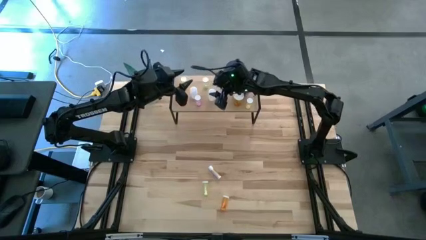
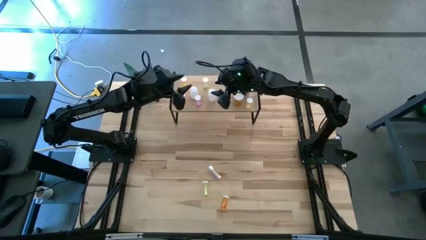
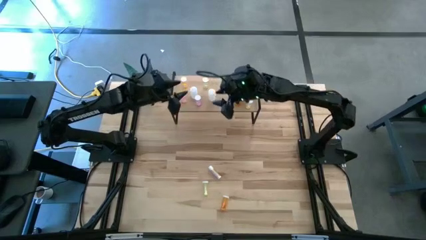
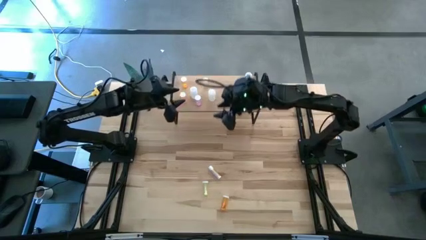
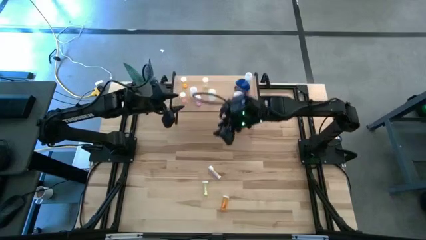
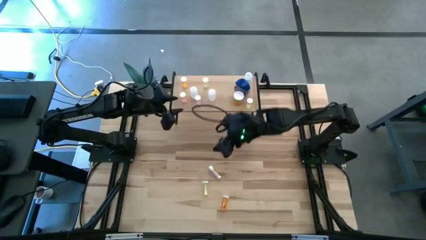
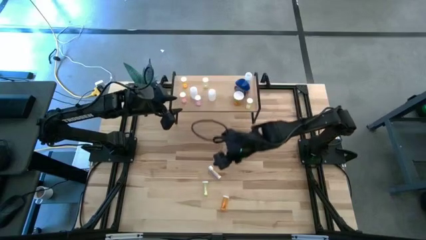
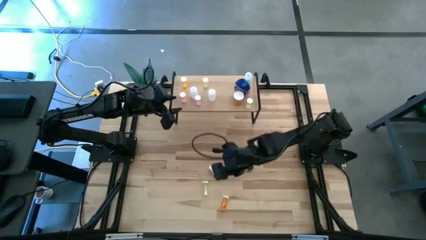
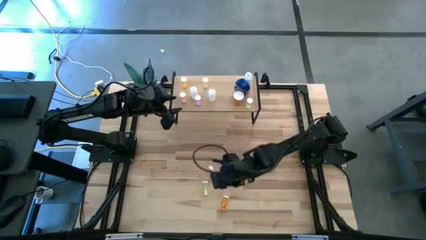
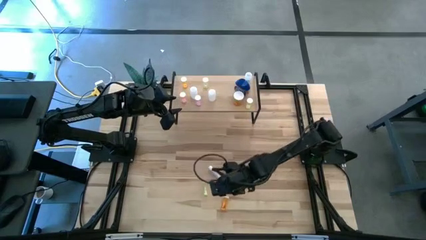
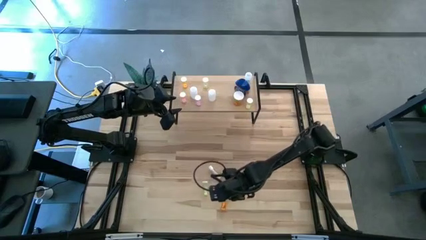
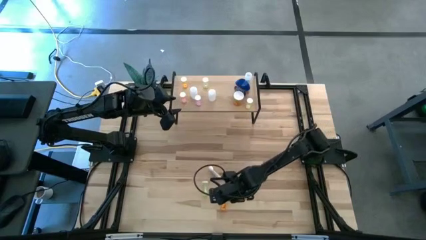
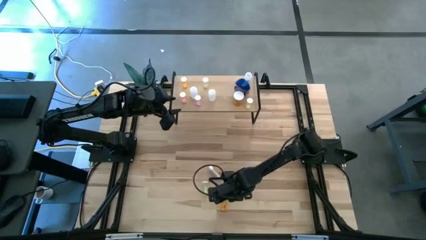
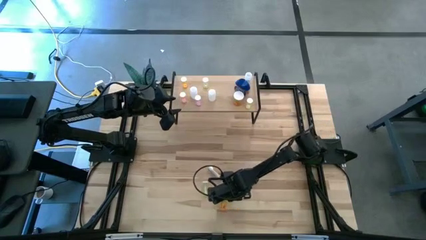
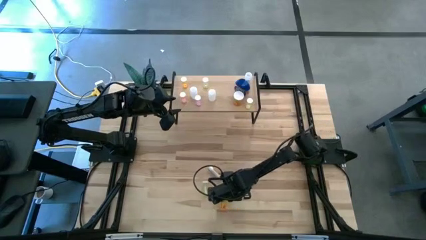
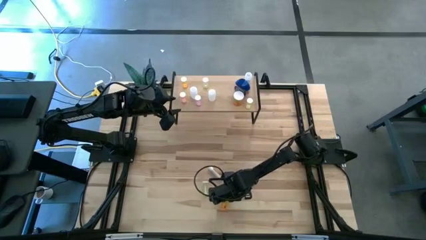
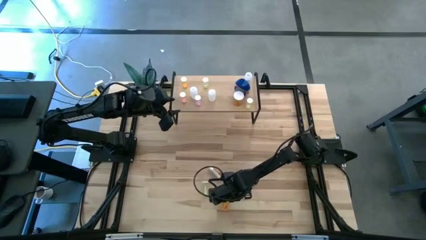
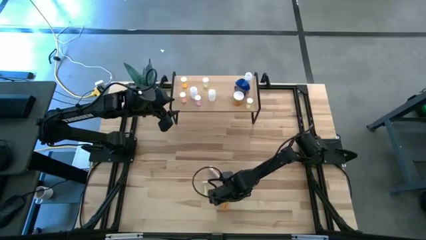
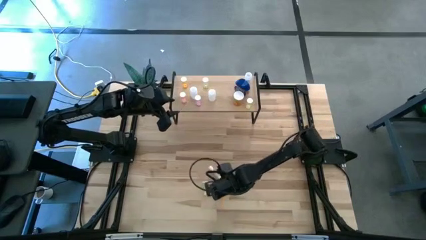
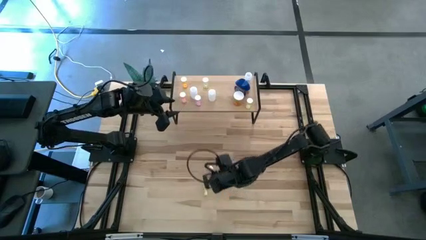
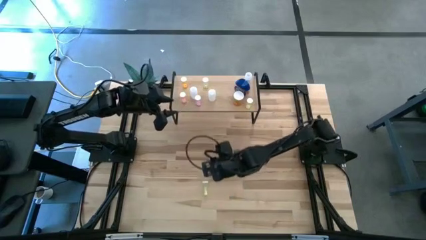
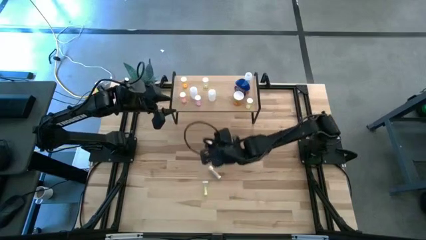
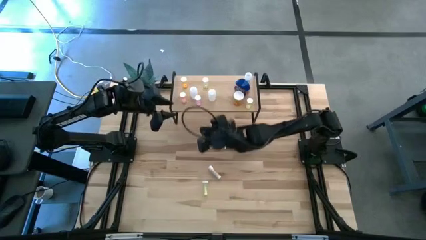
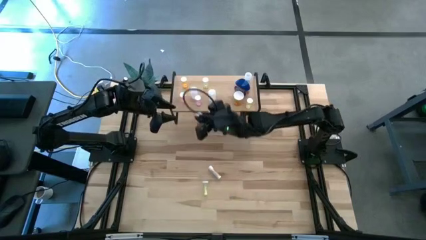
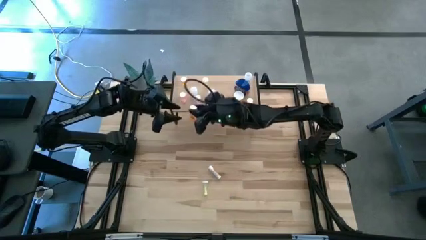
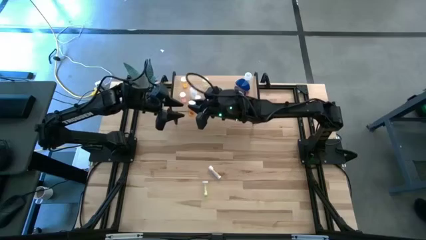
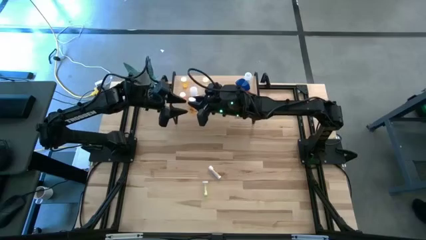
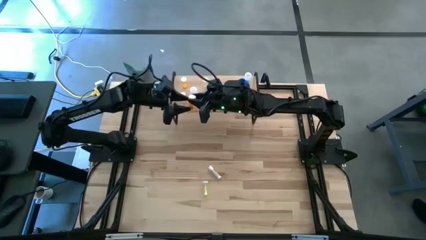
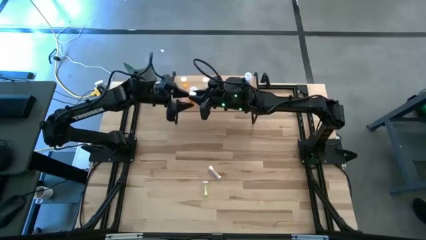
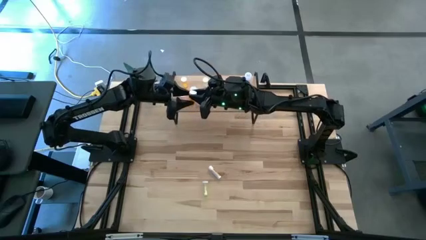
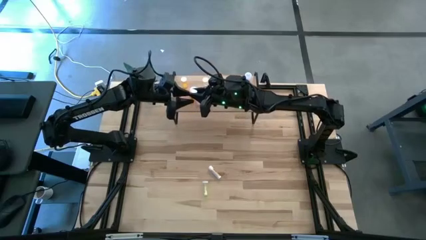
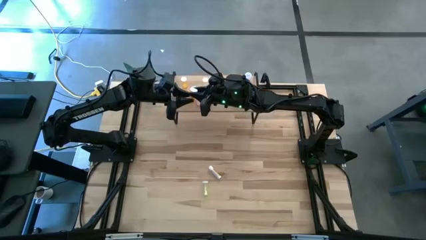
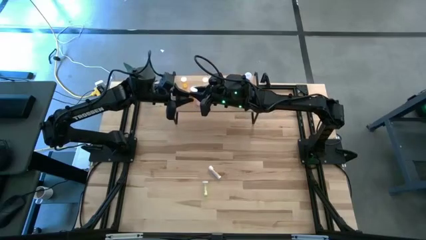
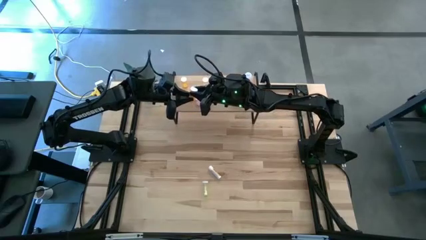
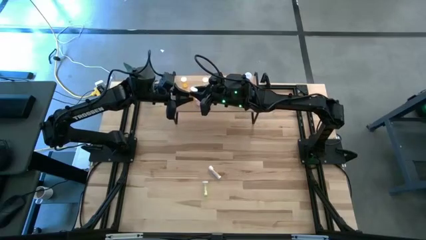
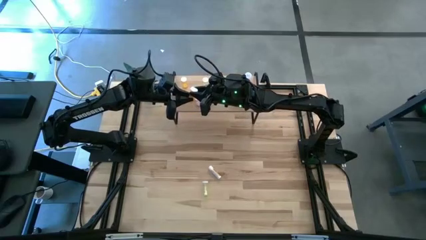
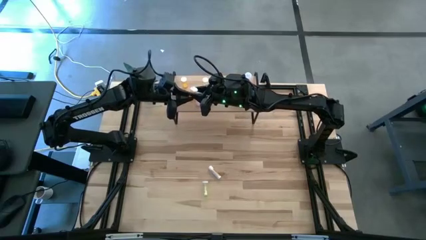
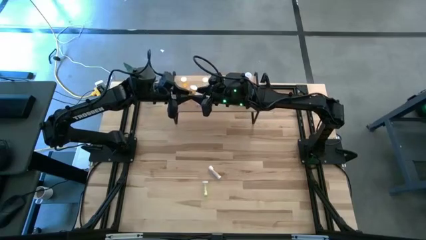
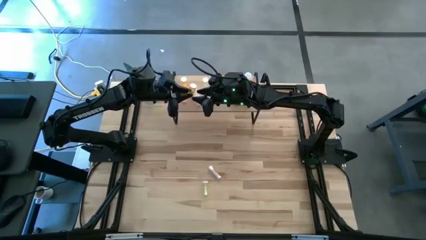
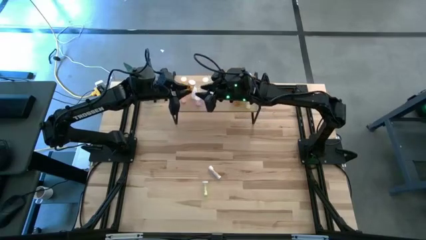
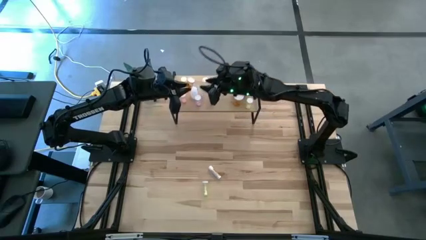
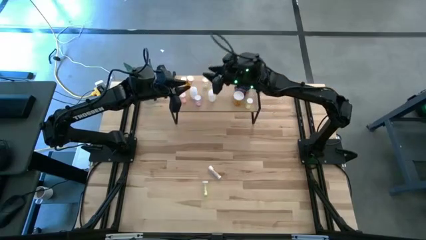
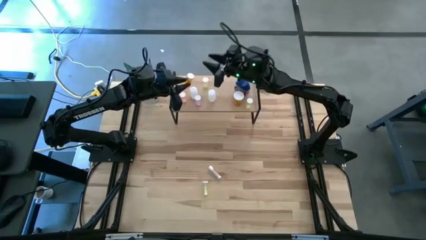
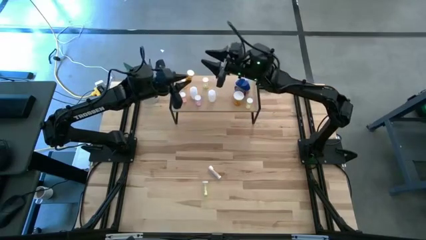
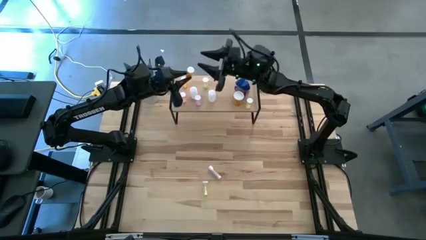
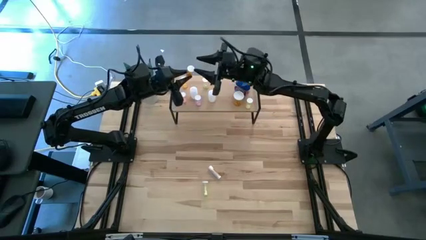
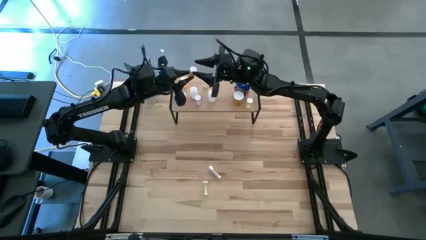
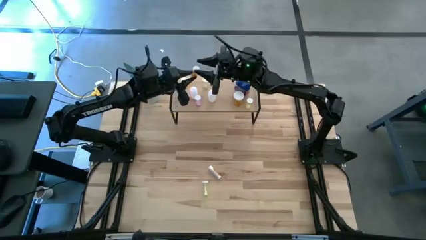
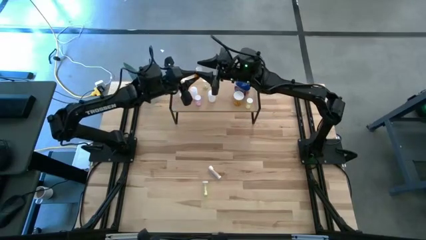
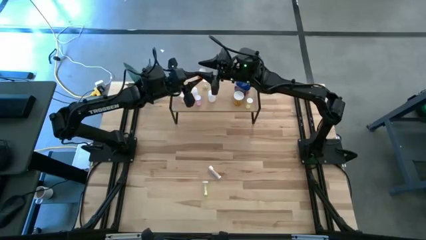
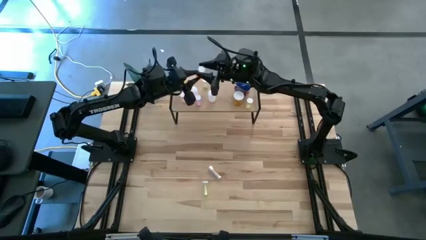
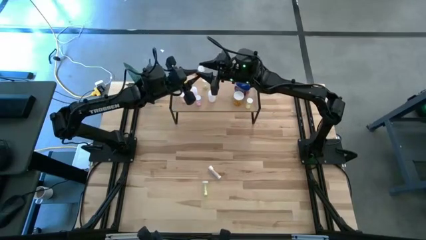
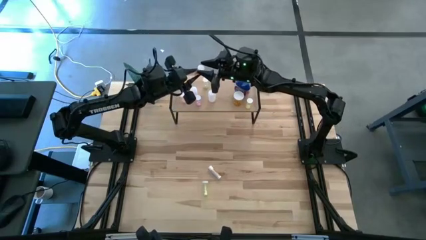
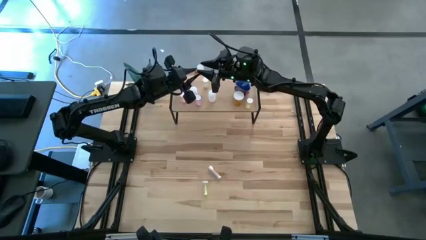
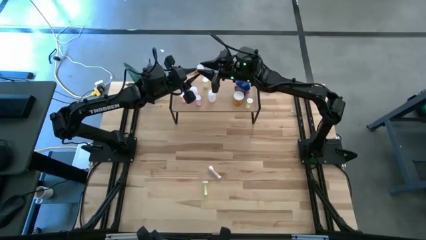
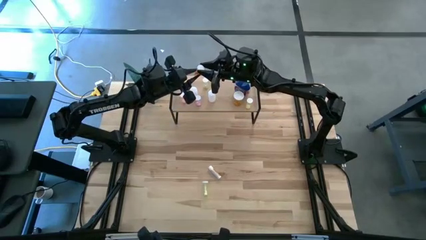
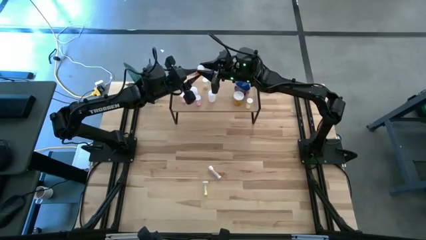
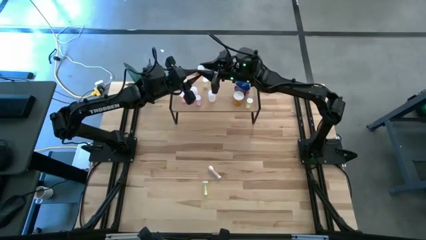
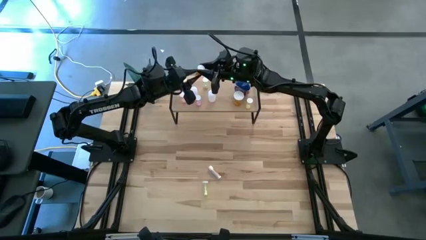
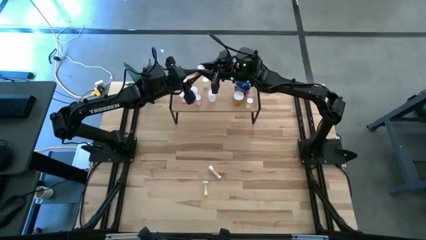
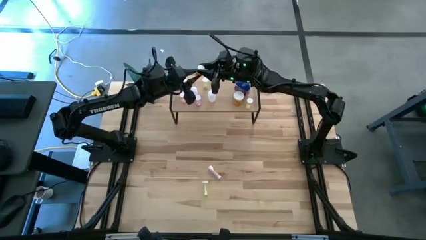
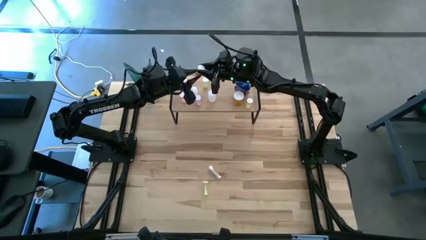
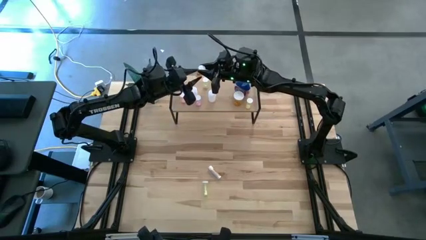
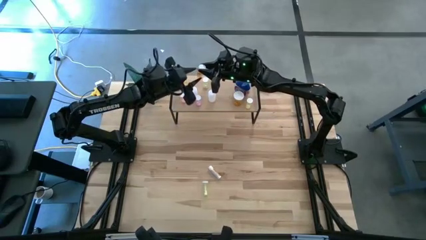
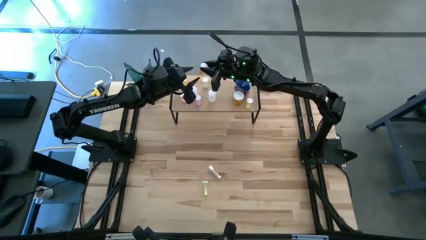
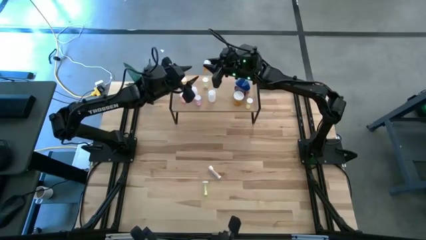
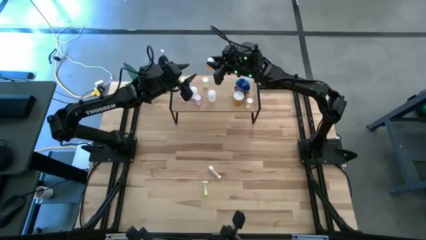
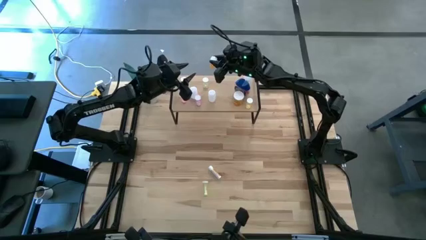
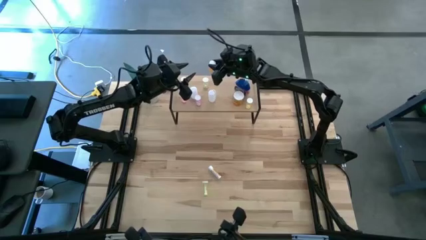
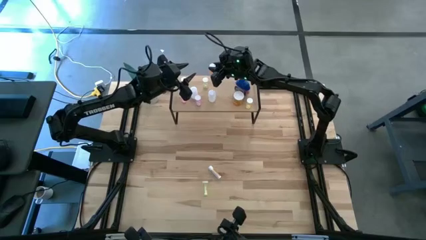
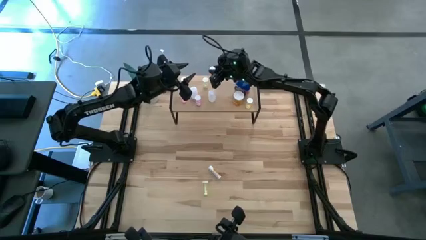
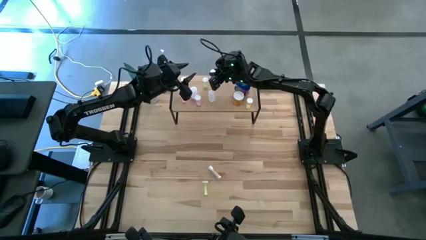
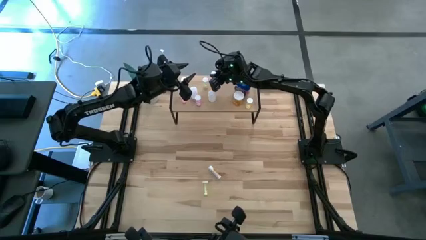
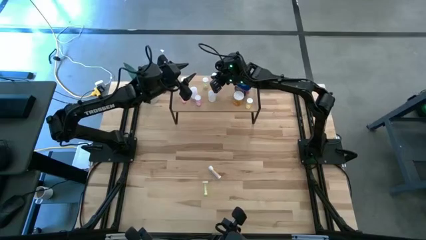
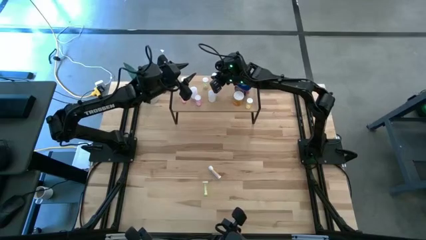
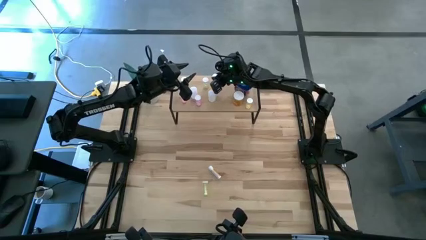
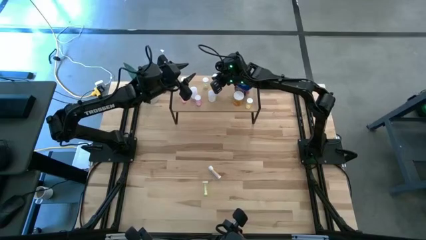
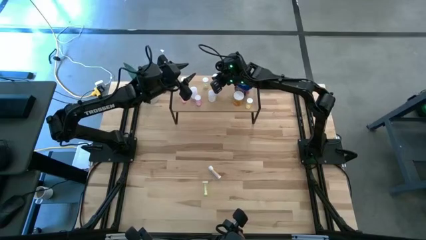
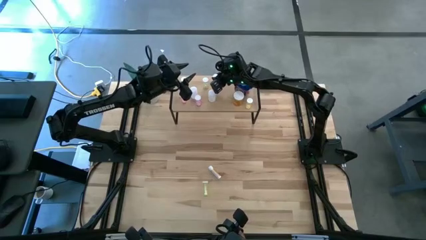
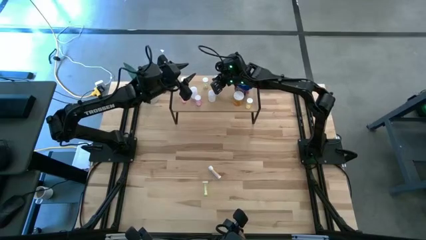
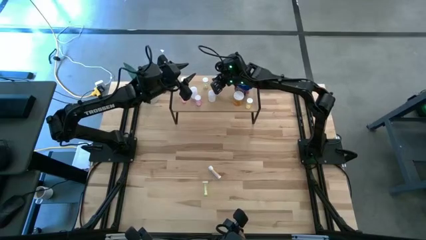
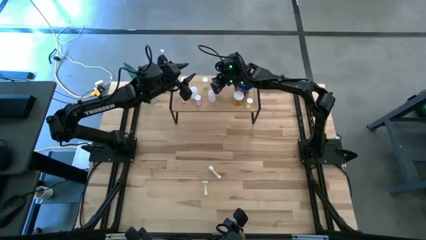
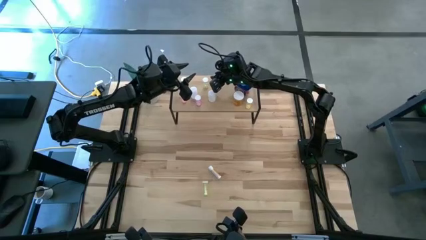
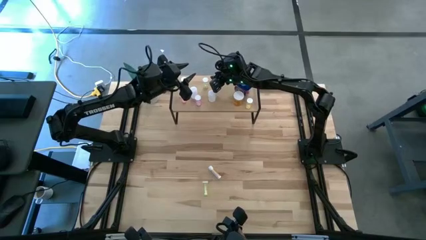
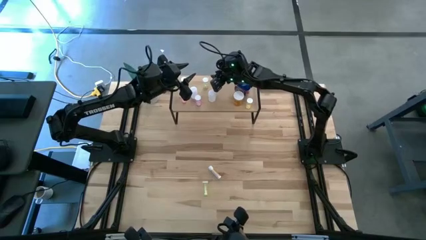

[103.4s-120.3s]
Task: Pick and place medicine bottles onto shelf by color
Put the small orange pill bottle on the shelf
